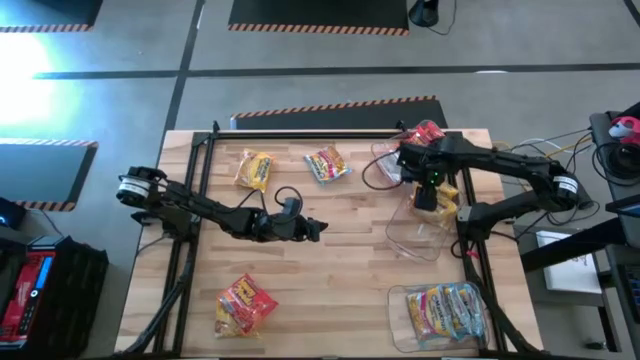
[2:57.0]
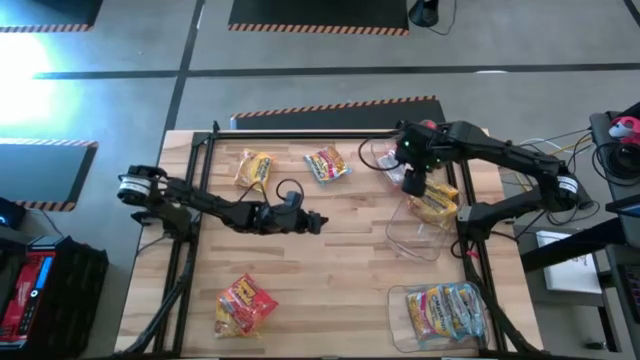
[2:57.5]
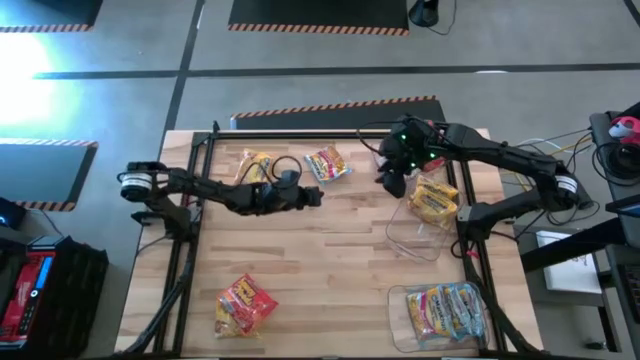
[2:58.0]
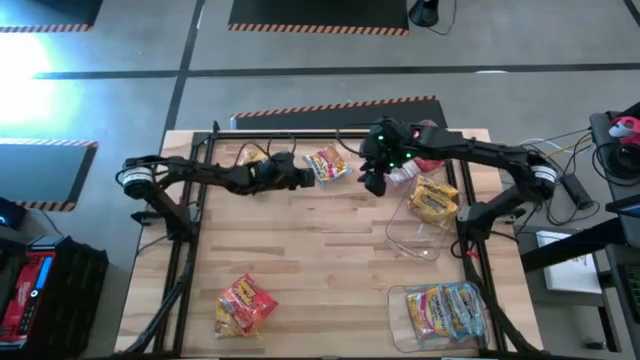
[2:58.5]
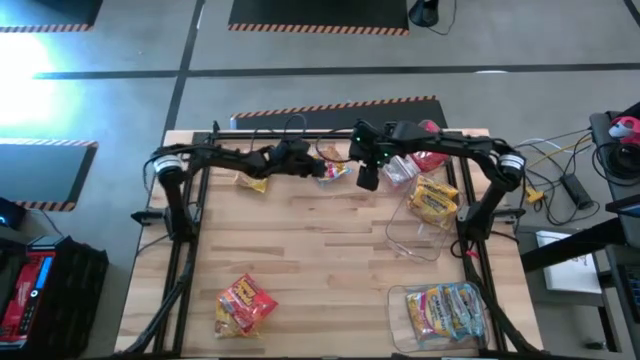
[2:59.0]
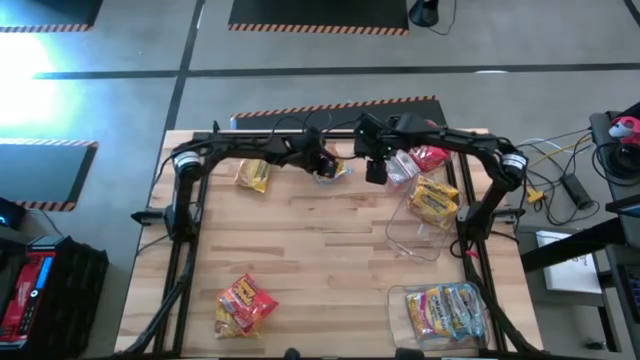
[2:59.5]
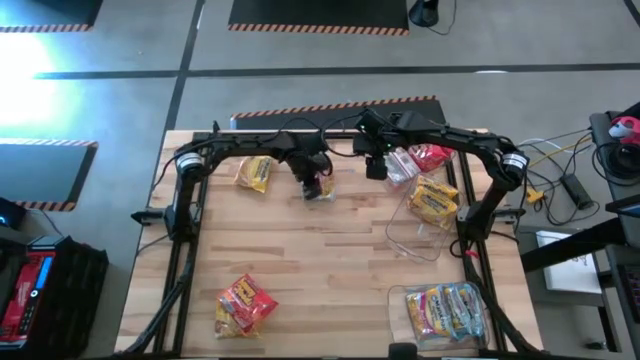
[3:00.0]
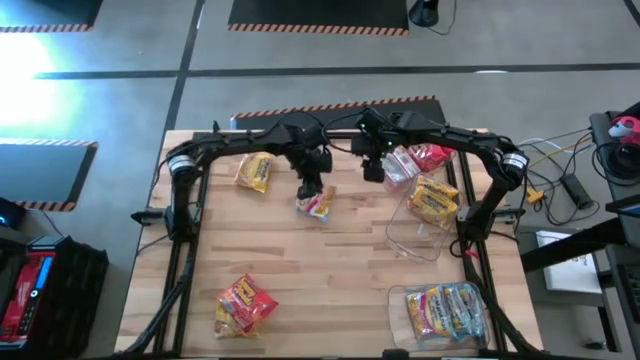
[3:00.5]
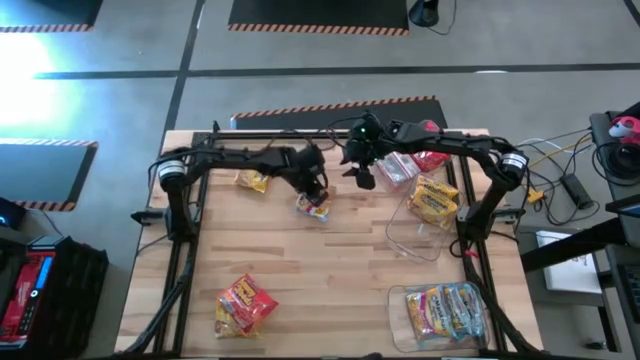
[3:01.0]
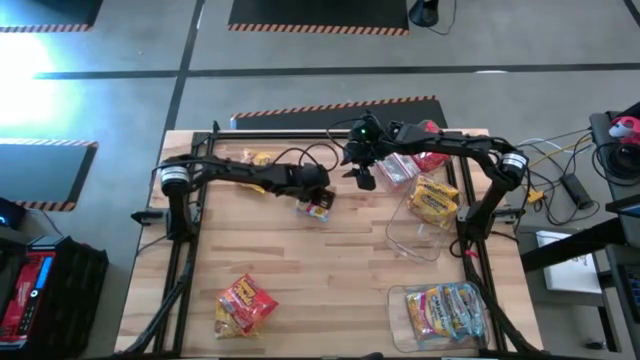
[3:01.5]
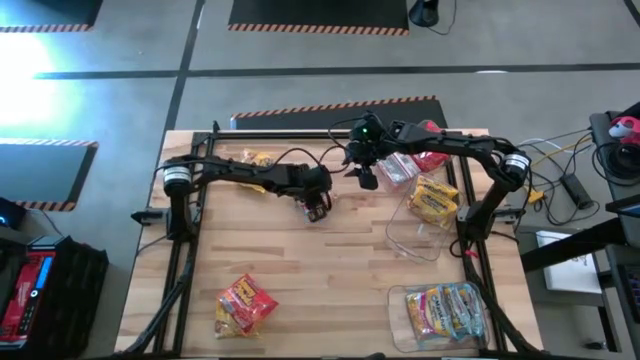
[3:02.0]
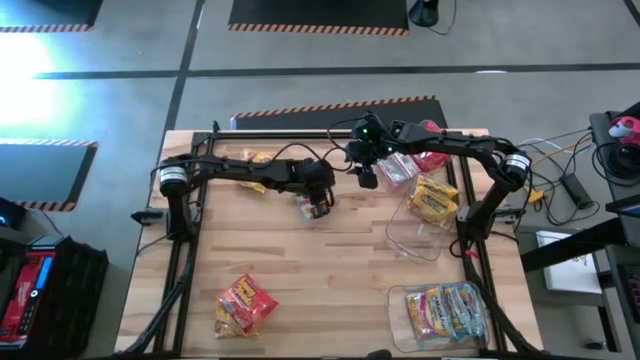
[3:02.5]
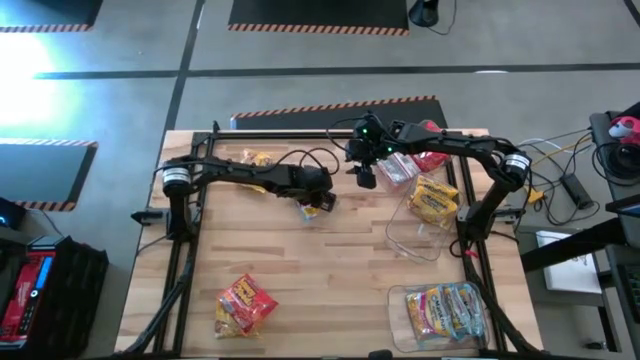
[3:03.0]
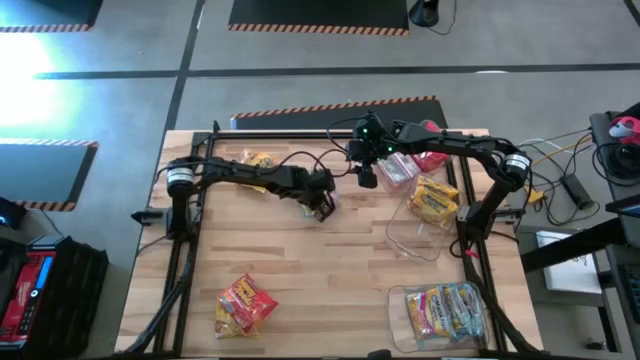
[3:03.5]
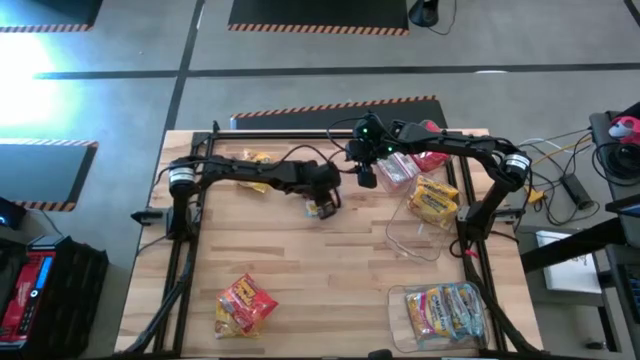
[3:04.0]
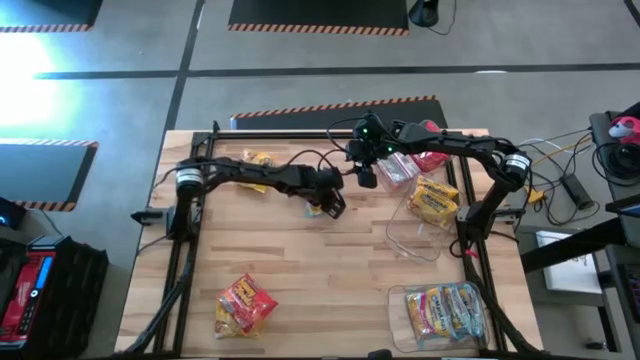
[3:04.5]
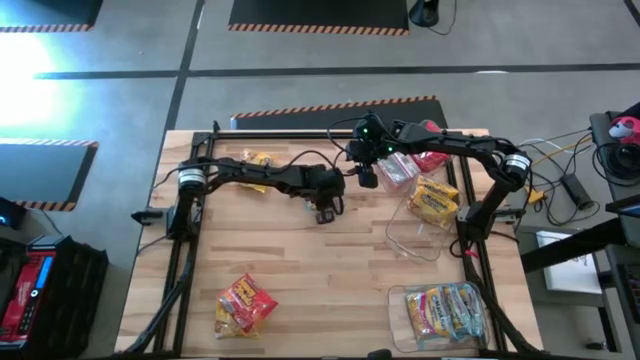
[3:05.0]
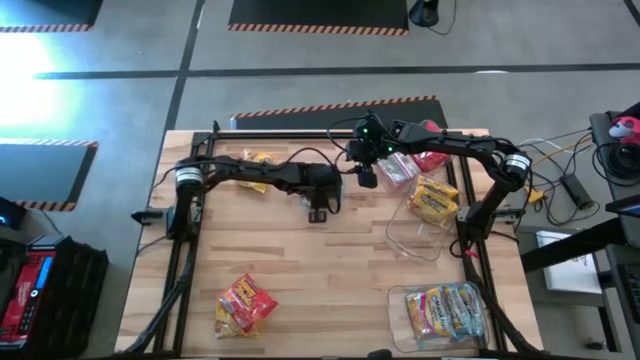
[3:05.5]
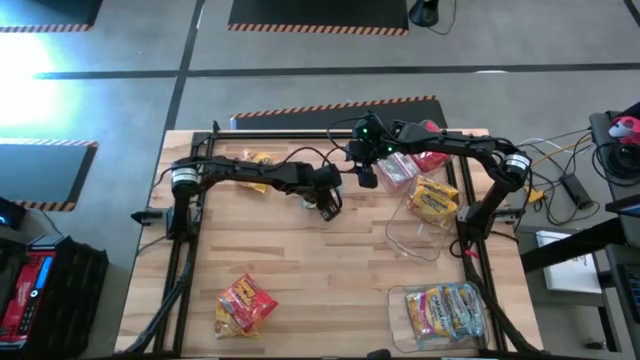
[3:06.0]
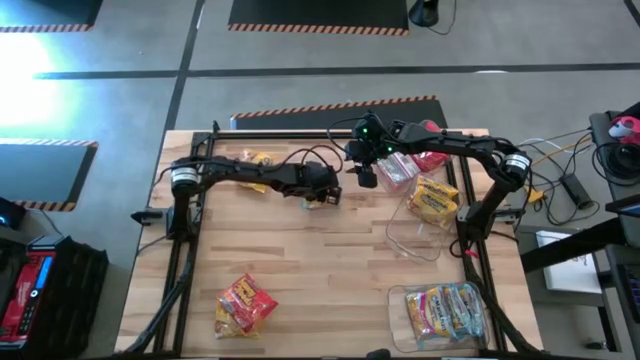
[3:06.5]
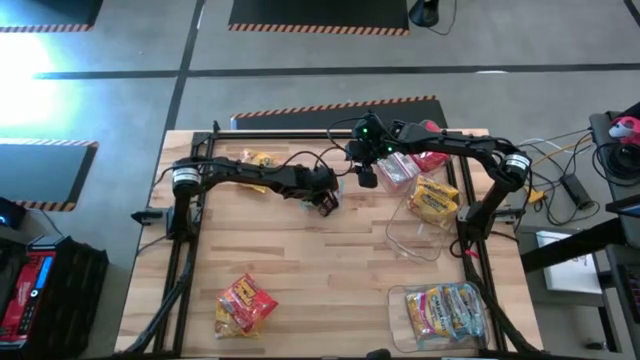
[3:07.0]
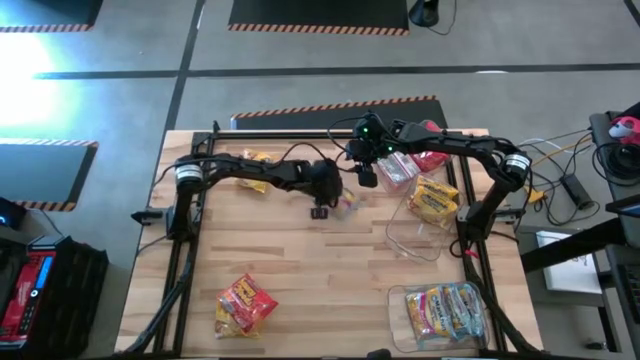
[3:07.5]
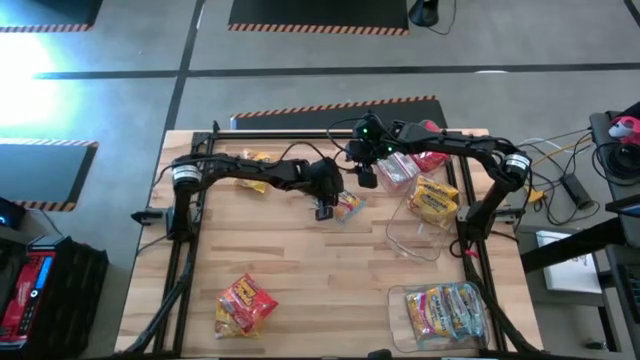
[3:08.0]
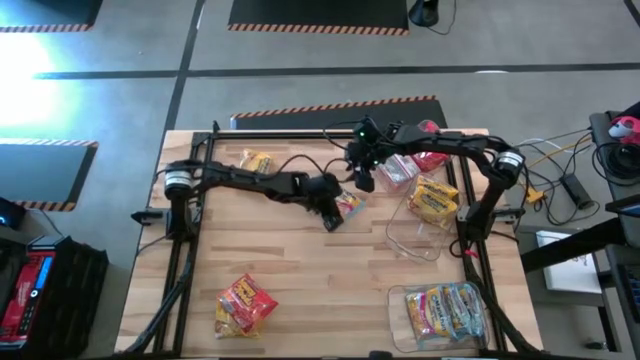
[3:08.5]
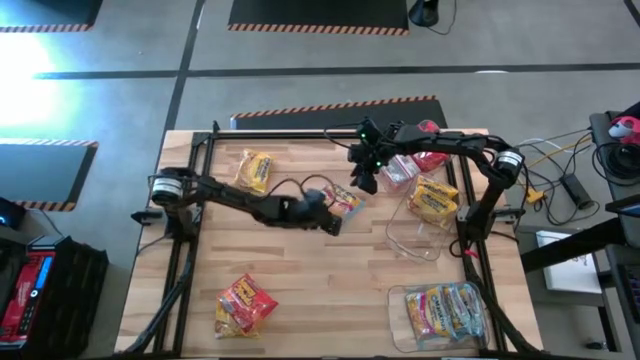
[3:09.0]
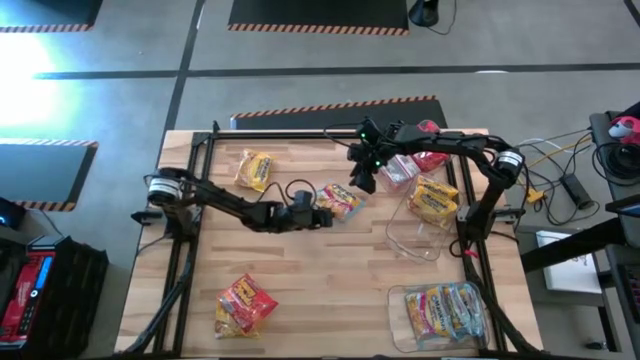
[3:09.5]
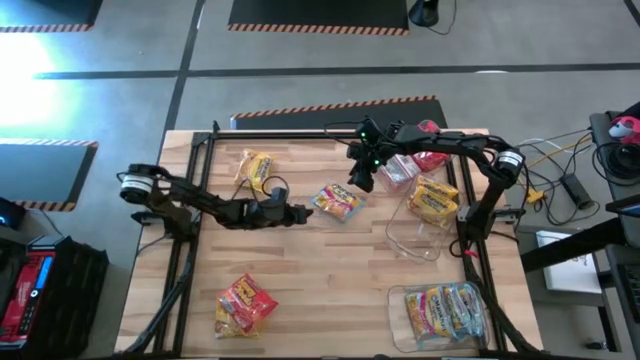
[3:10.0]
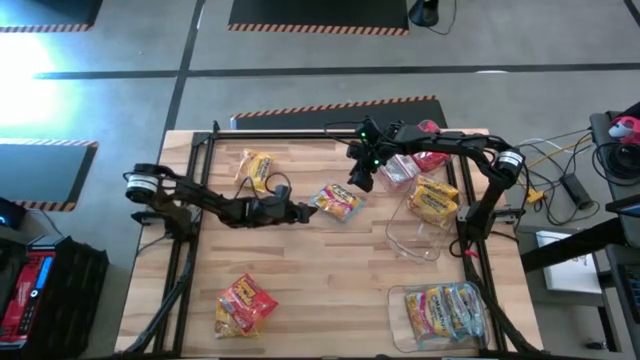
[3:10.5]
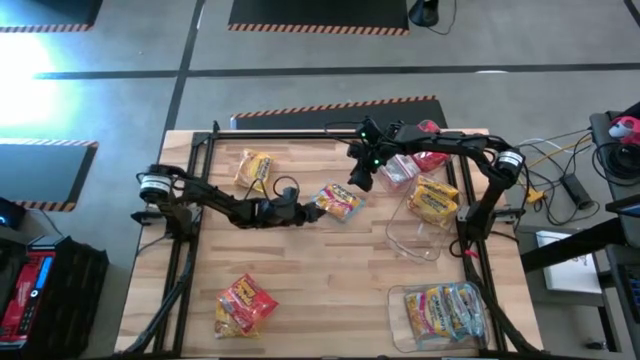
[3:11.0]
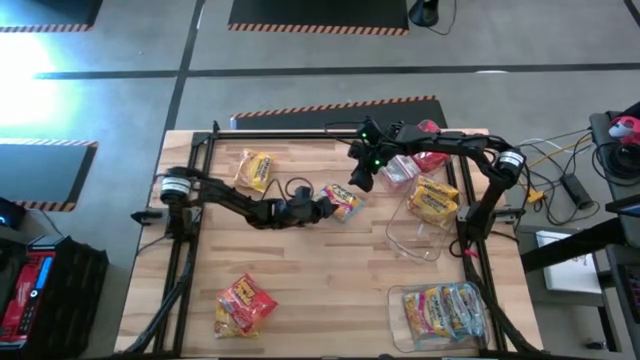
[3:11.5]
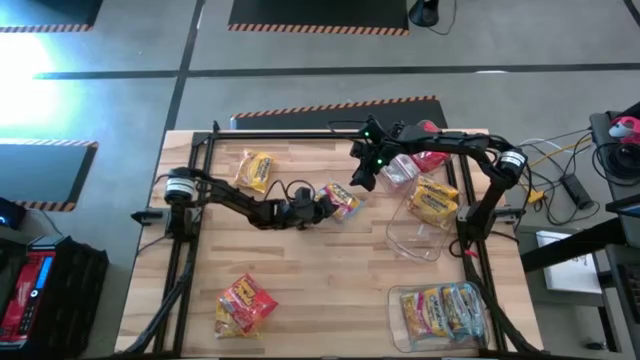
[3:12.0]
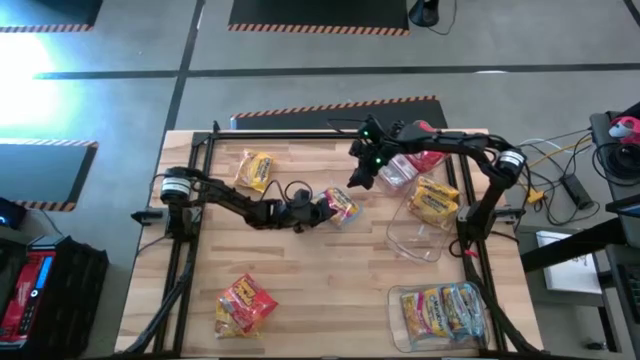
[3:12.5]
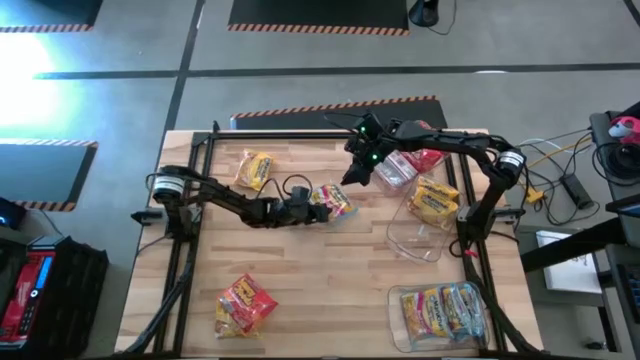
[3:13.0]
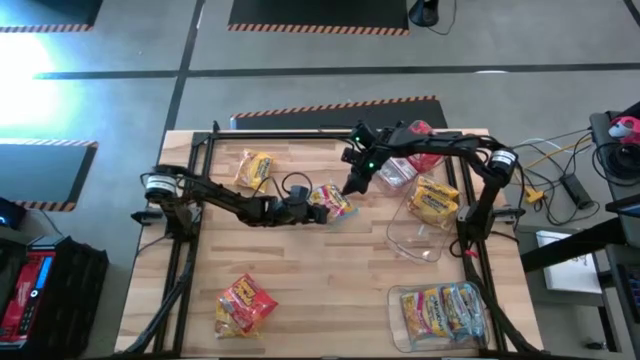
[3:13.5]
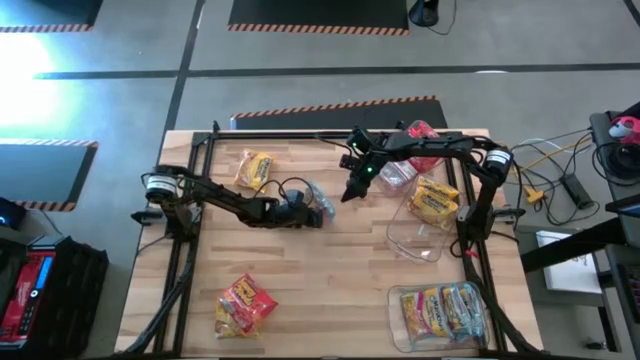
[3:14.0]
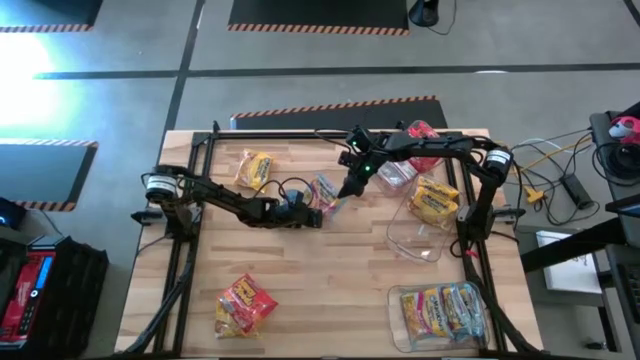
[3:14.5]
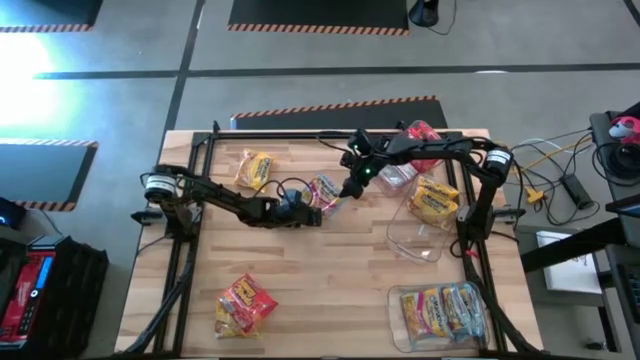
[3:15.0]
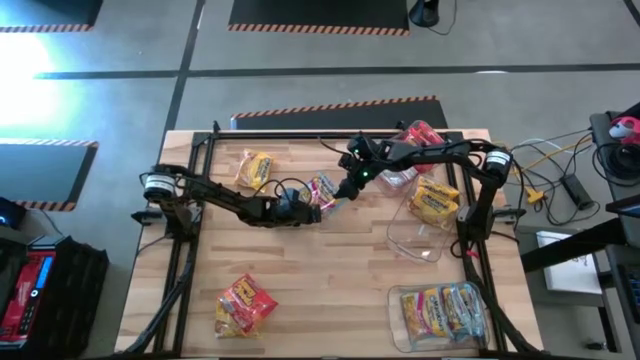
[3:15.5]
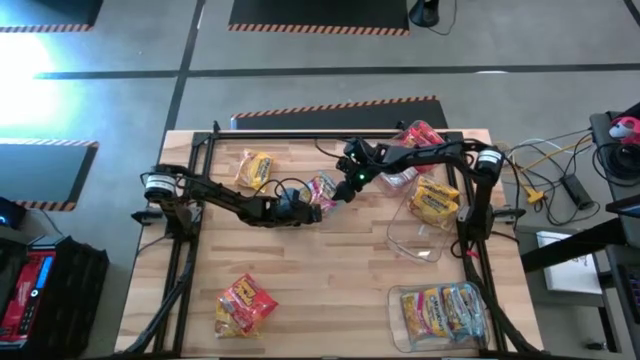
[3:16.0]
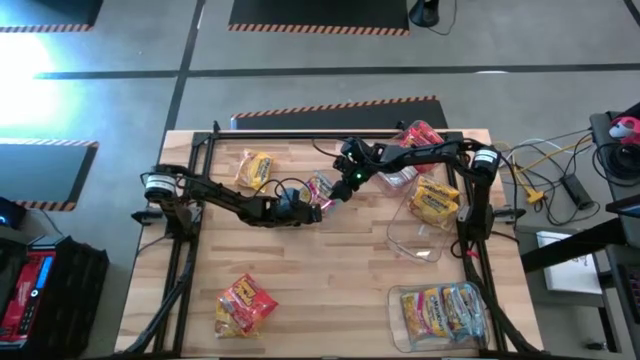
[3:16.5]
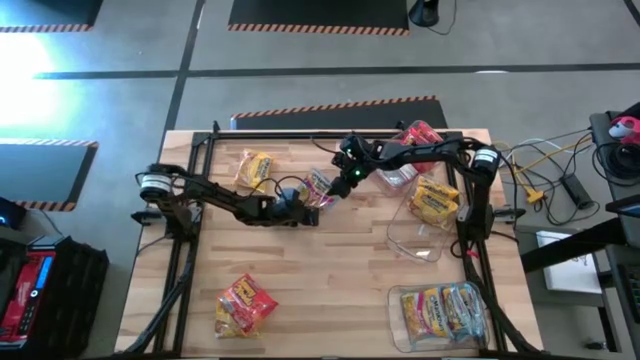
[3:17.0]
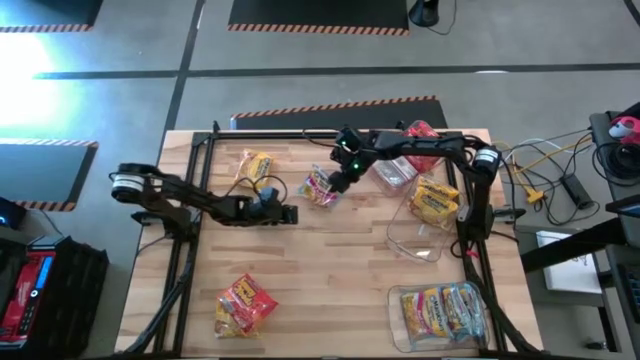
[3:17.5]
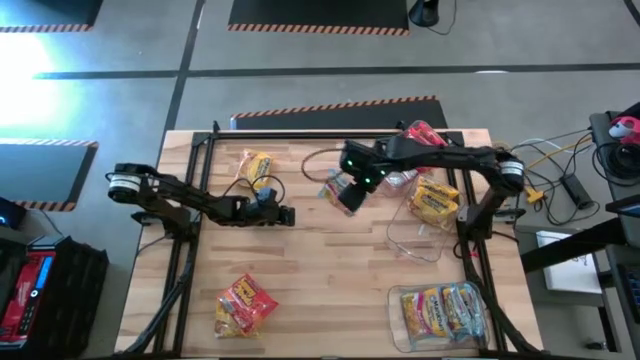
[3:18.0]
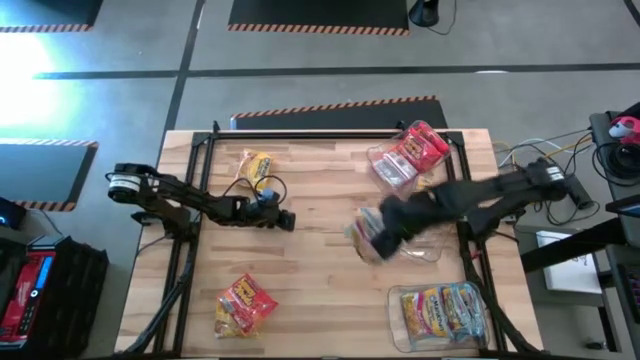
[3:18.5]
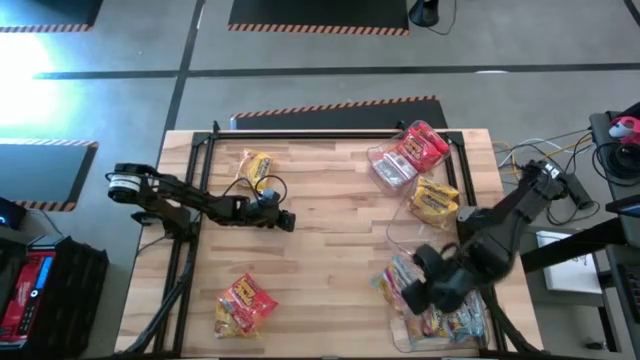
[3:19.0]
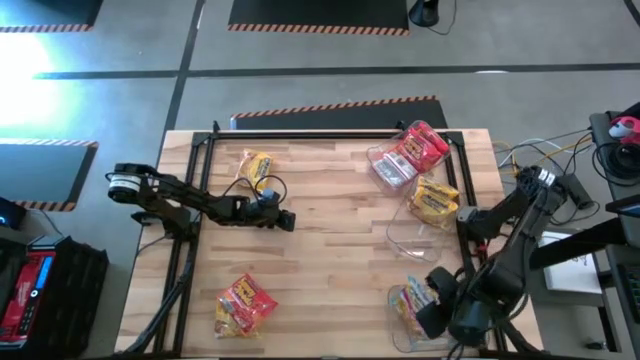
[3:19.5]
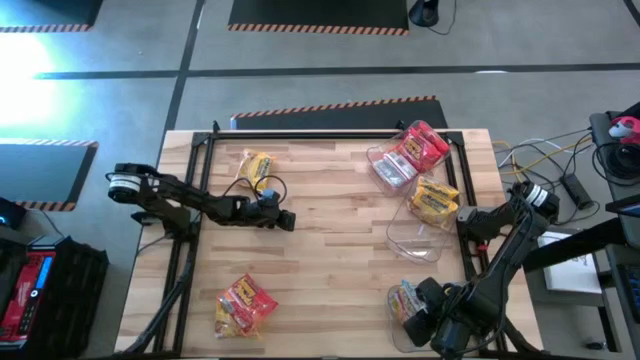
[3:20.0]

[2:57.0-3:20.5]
Task: Sort Maruchan noodles
Put the blue noodle pack into the bottom transparent bin
